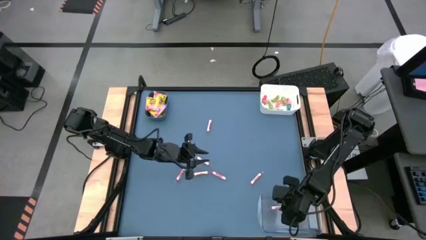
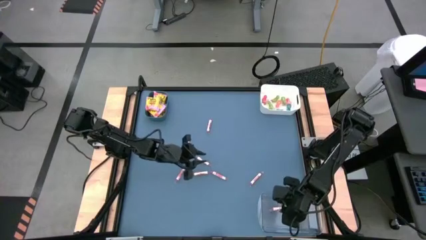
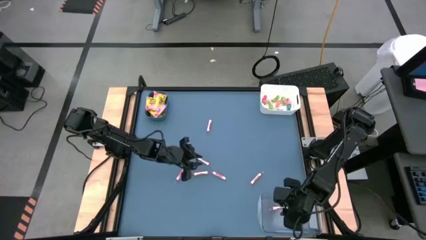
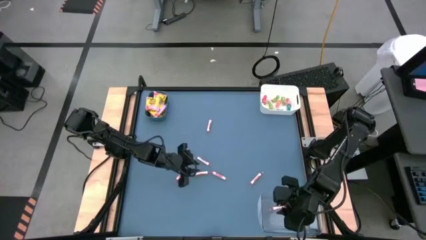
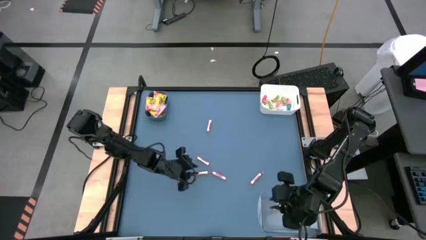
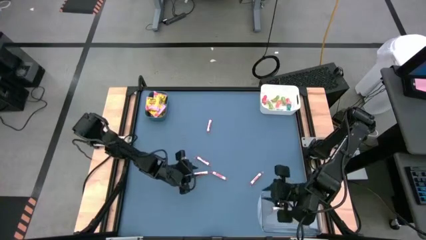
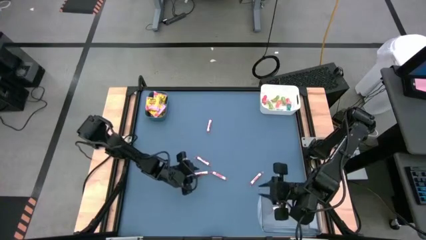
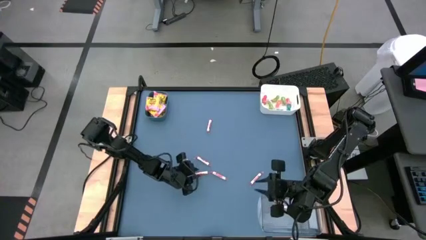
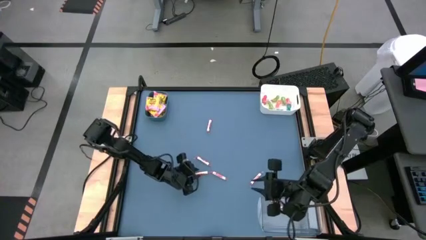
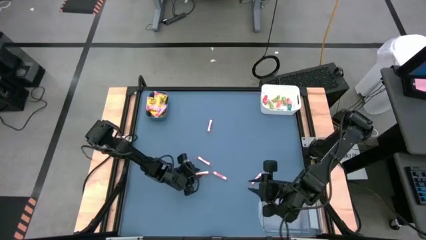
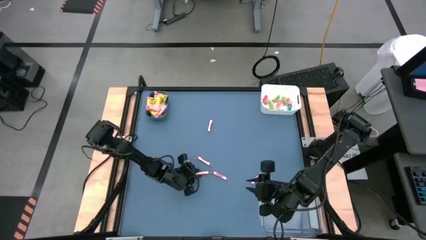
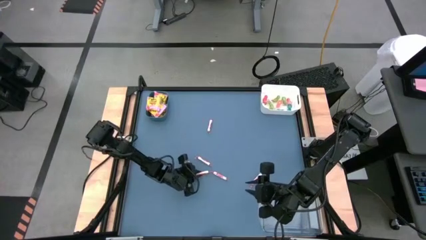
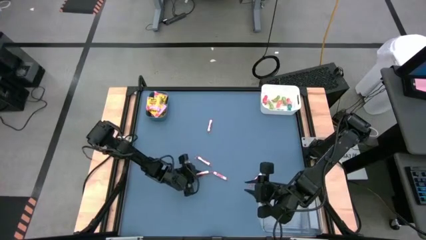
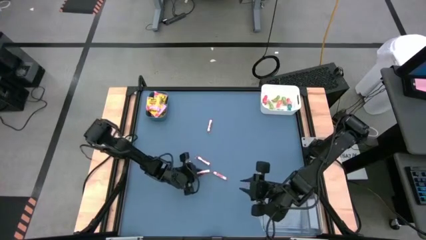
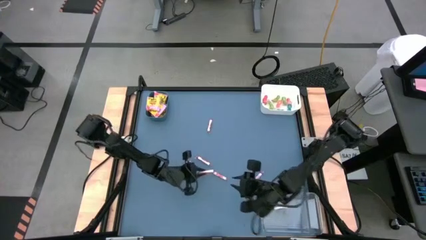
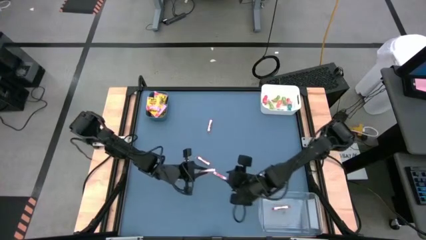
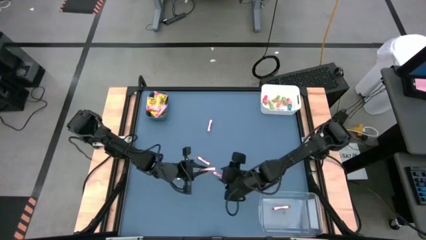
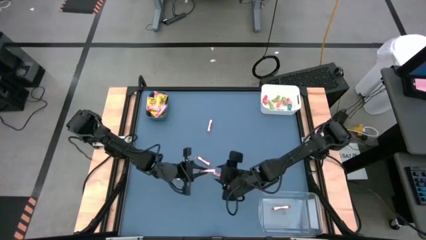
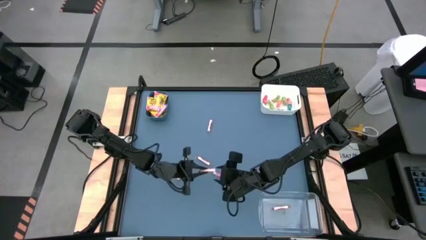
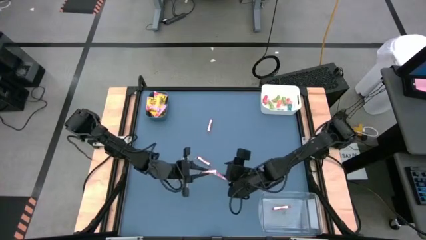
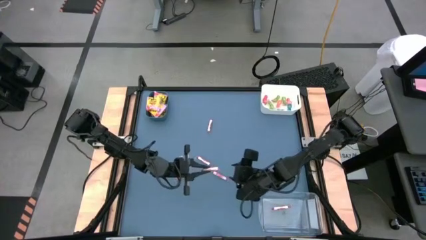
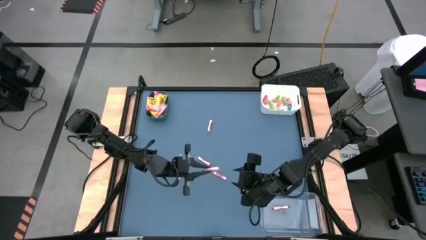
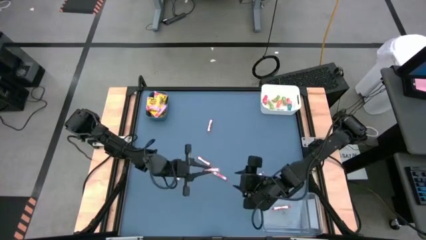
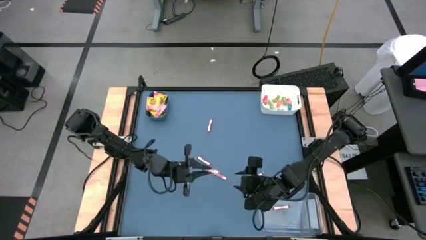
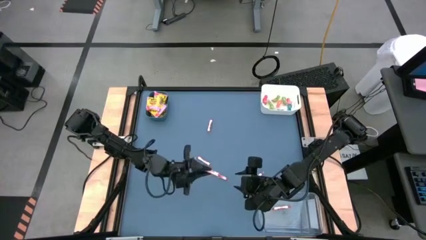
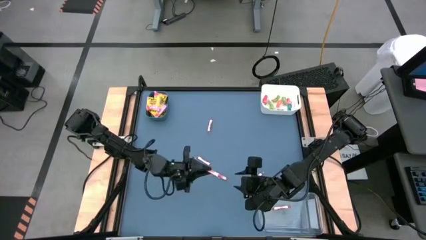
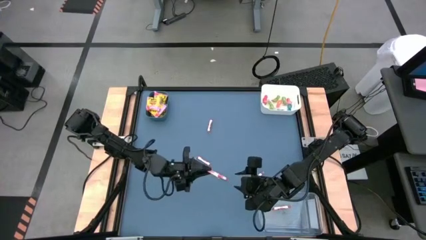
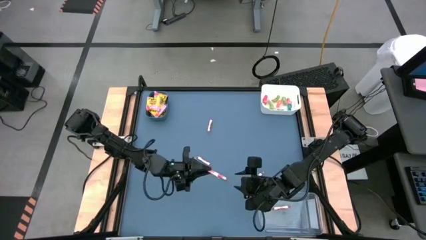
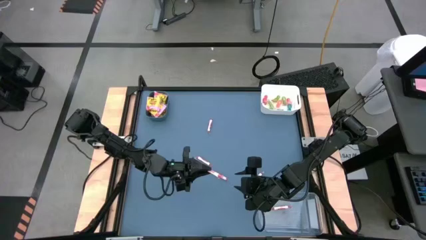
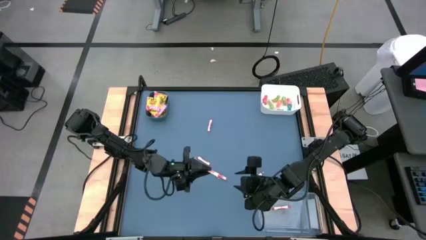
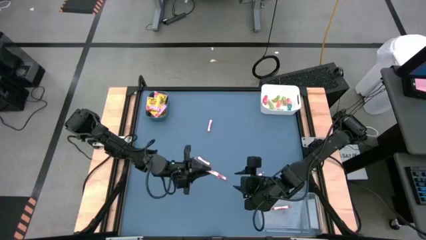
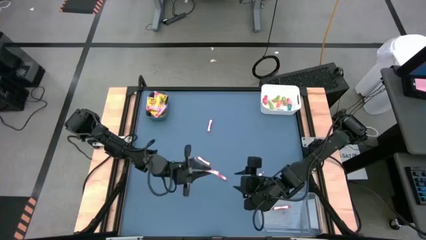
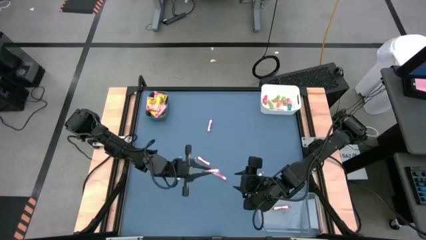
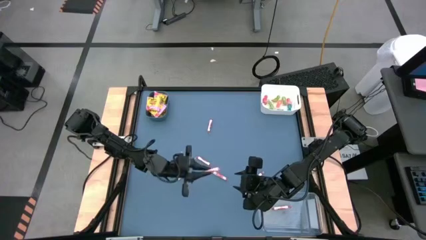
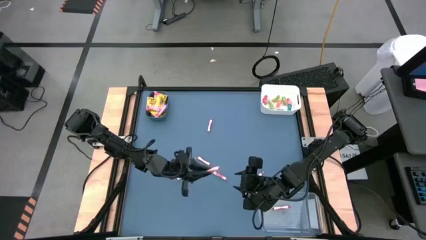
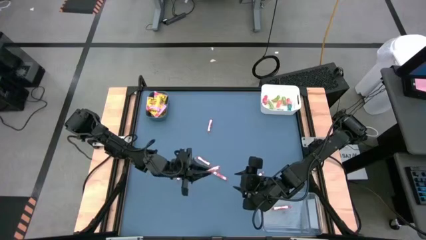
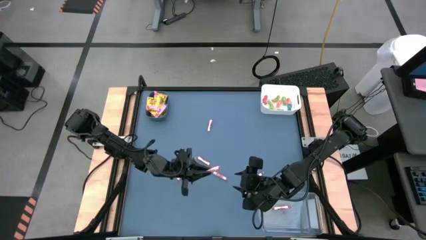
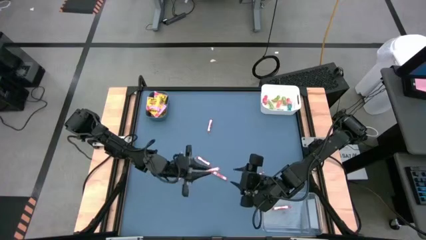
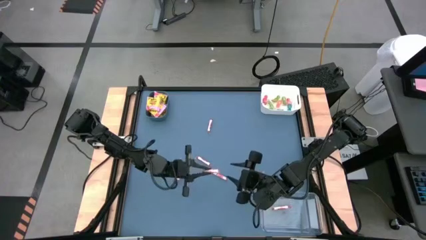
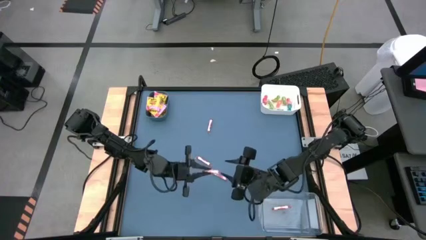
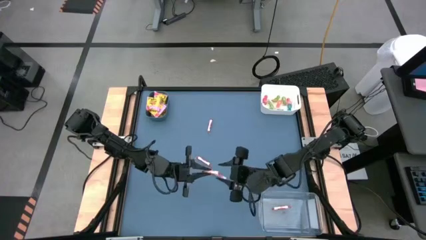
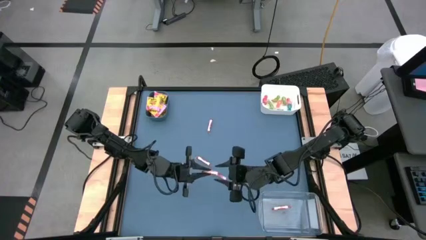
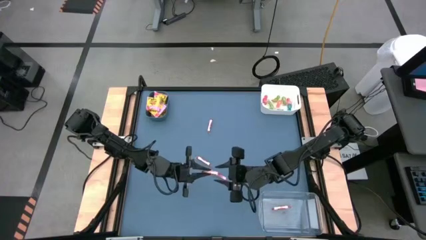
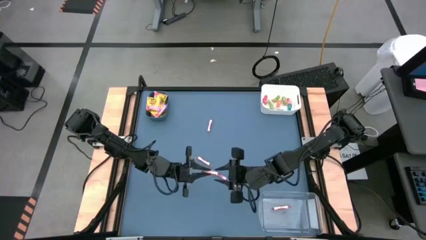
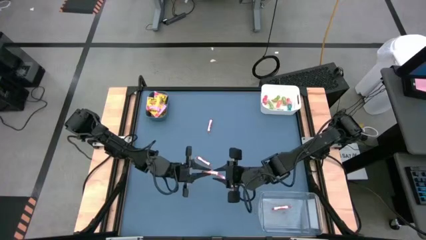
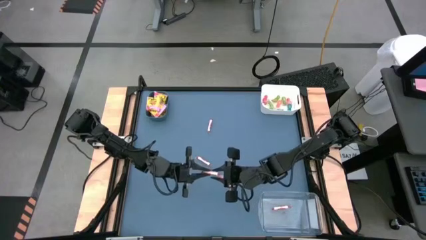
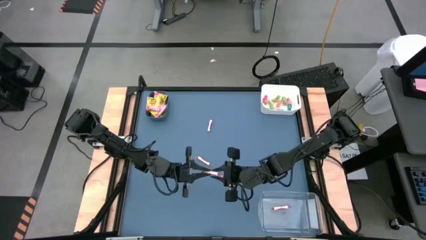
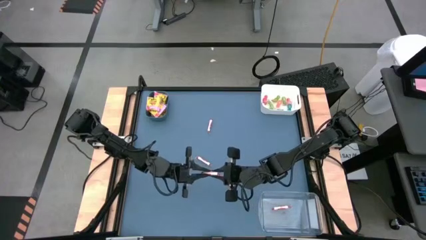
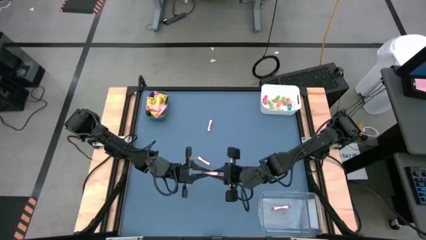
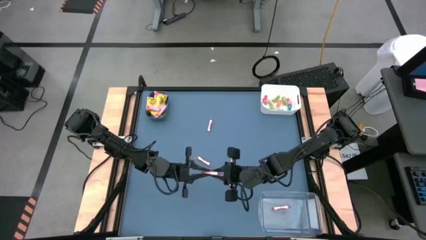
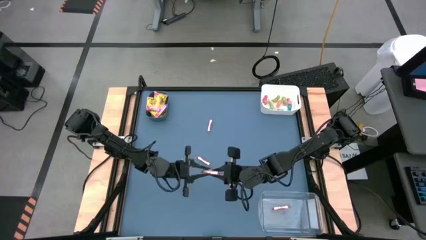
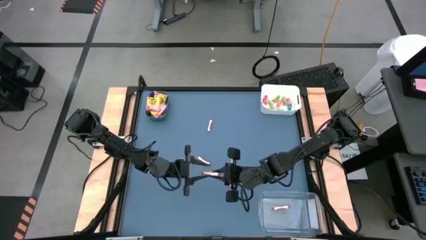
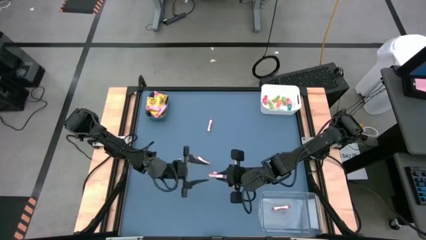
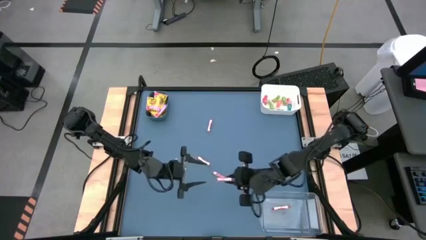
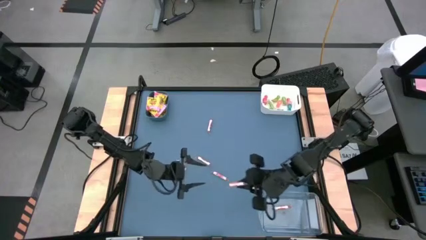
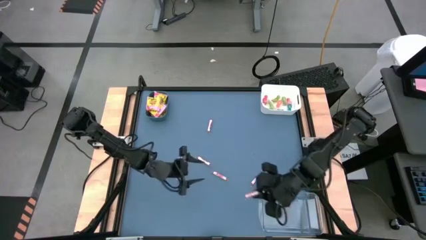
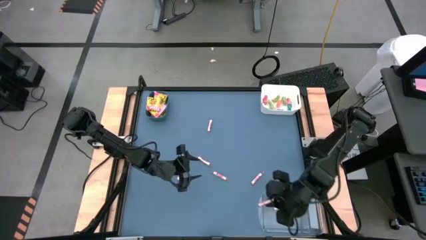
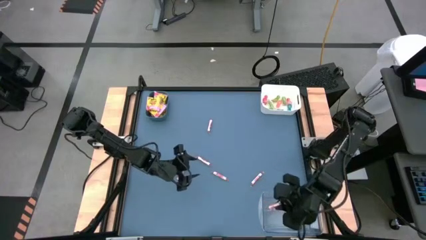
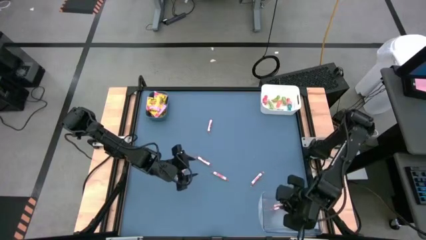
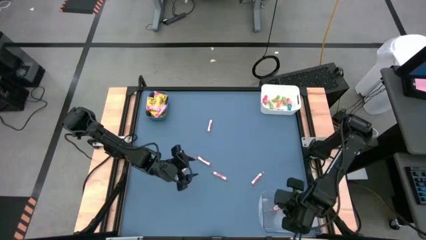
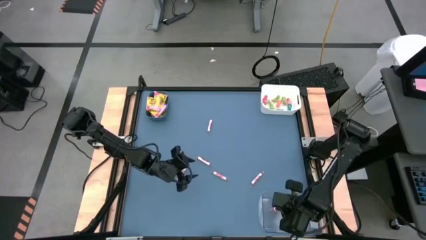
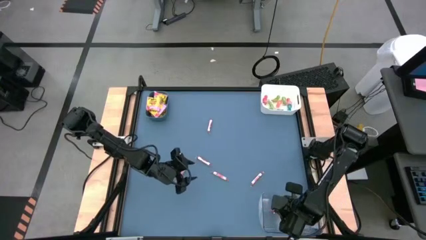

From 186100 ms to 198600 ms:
Task: Sort candy
Put the white candy into the transparent bin
